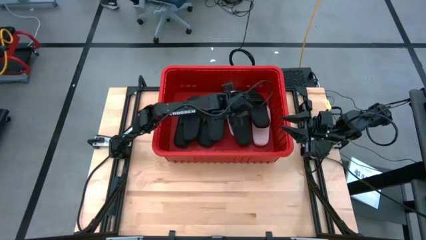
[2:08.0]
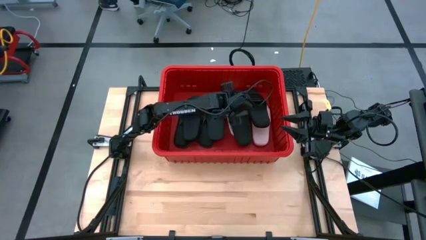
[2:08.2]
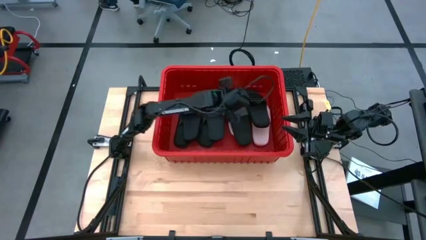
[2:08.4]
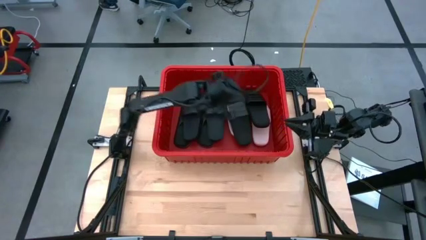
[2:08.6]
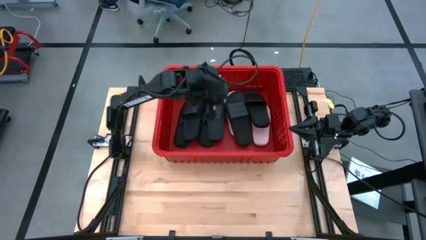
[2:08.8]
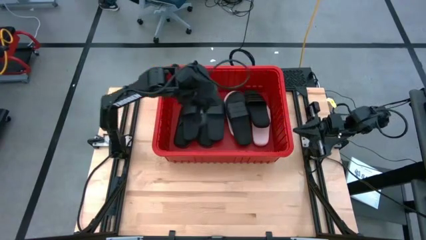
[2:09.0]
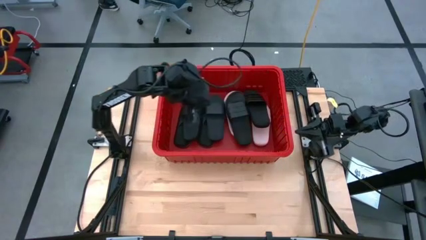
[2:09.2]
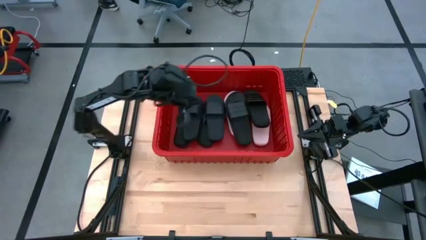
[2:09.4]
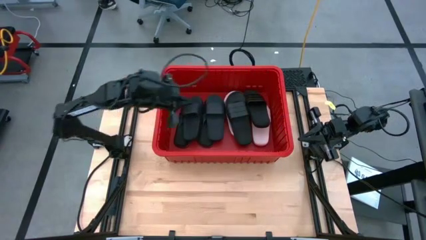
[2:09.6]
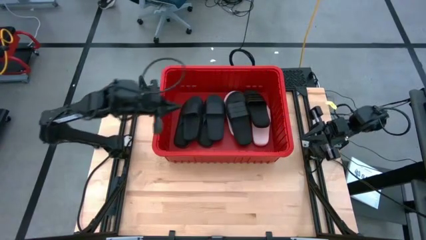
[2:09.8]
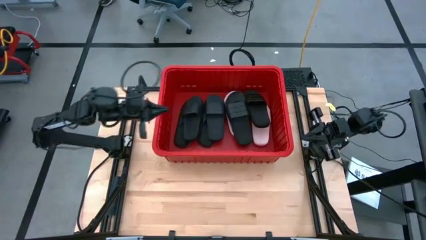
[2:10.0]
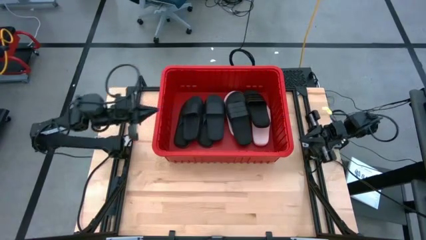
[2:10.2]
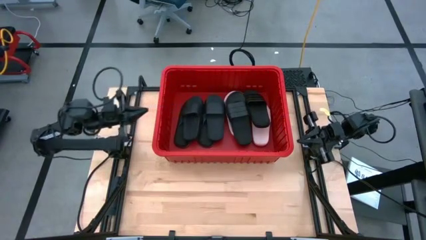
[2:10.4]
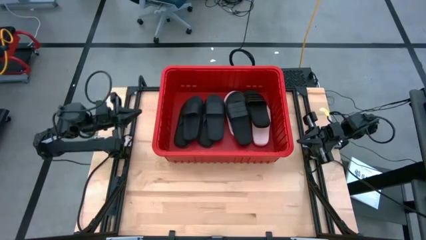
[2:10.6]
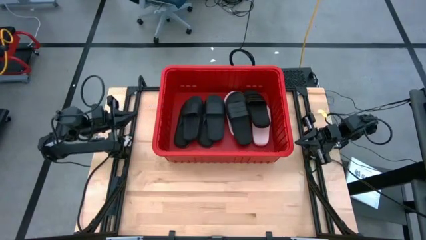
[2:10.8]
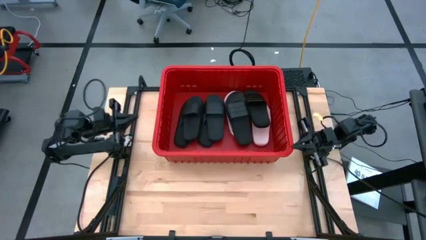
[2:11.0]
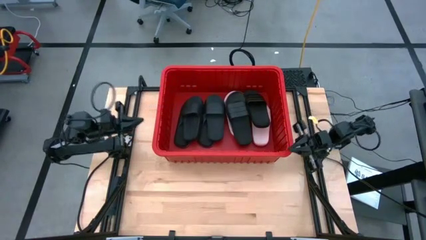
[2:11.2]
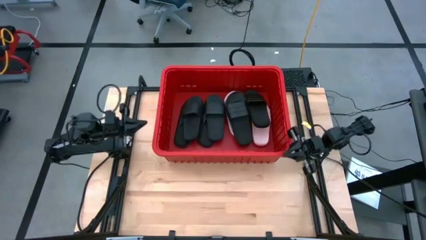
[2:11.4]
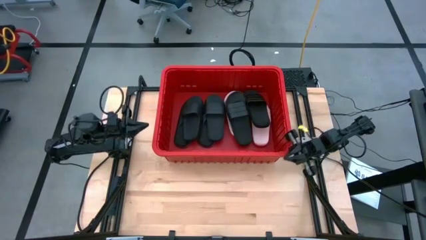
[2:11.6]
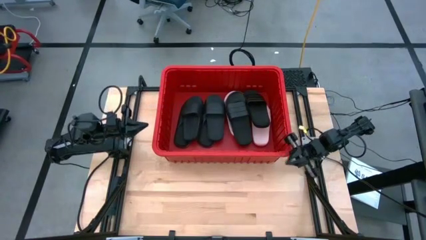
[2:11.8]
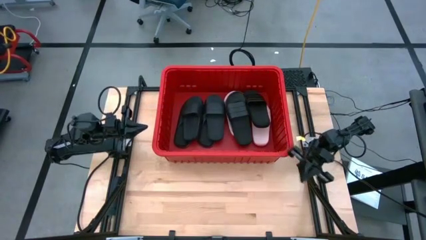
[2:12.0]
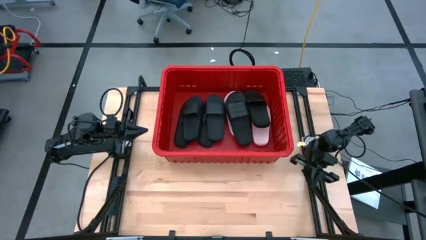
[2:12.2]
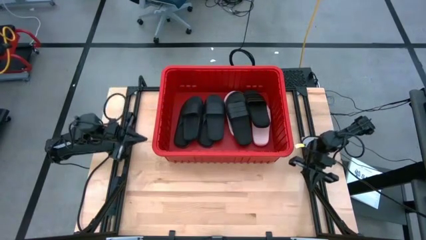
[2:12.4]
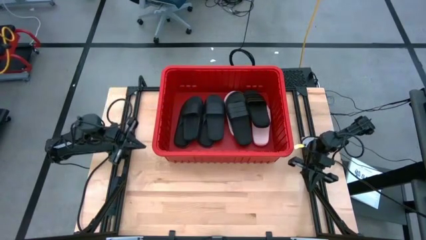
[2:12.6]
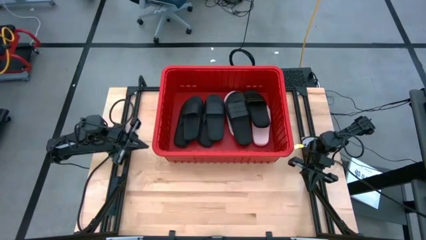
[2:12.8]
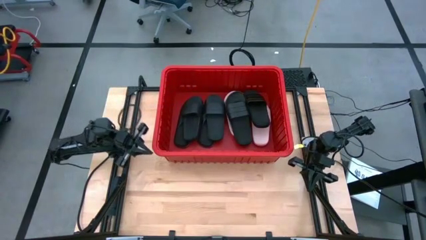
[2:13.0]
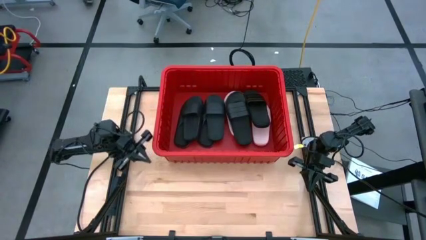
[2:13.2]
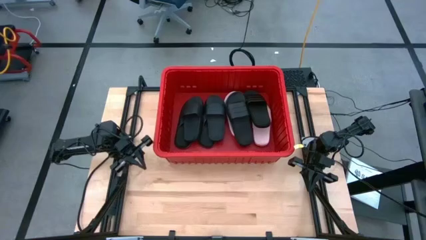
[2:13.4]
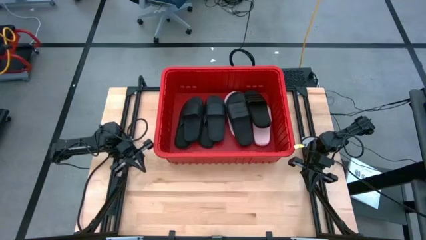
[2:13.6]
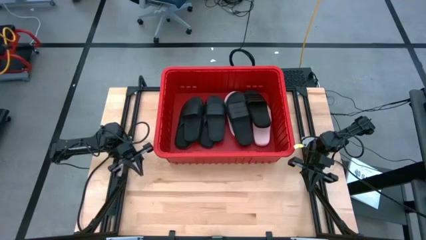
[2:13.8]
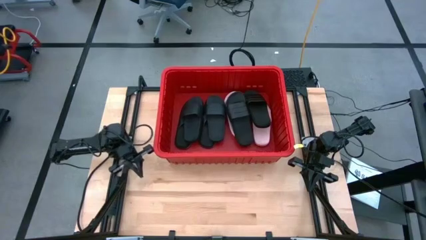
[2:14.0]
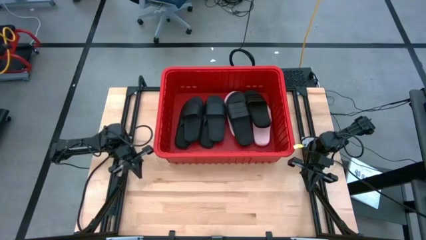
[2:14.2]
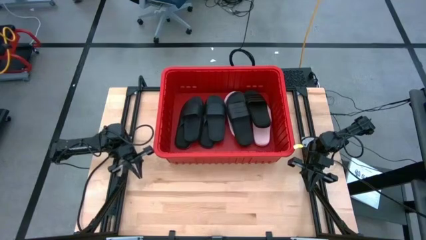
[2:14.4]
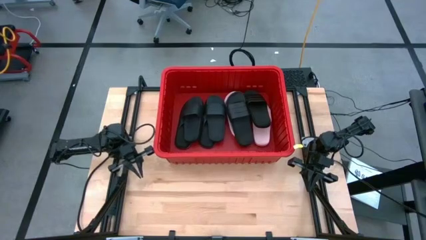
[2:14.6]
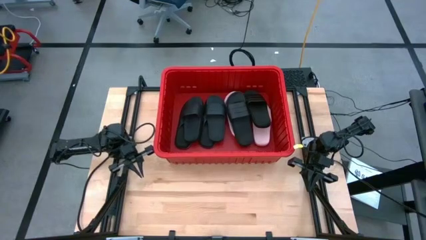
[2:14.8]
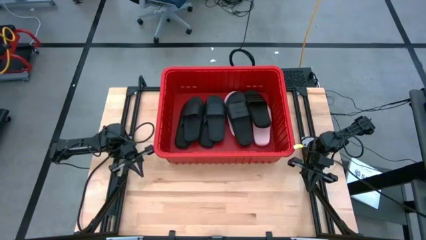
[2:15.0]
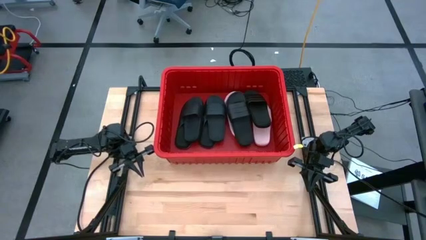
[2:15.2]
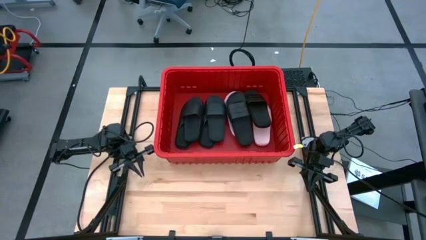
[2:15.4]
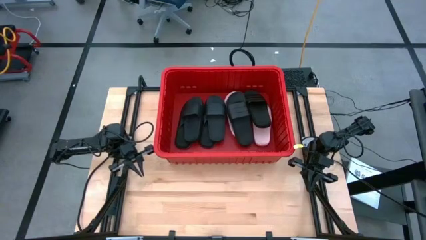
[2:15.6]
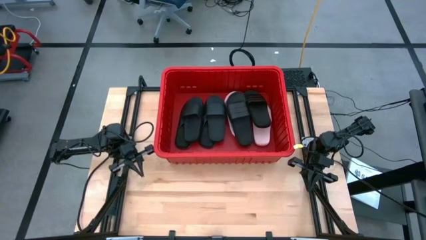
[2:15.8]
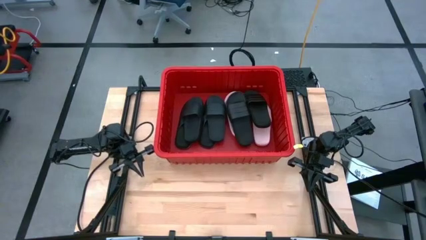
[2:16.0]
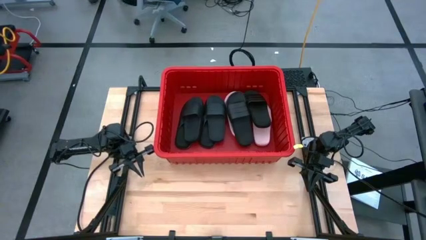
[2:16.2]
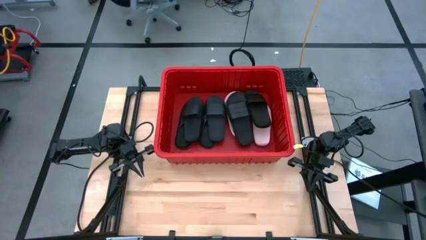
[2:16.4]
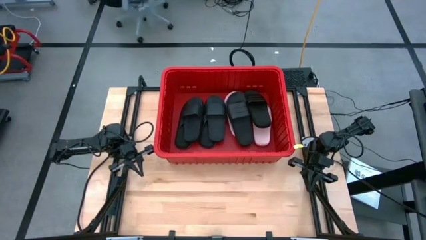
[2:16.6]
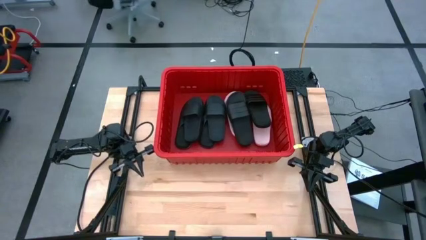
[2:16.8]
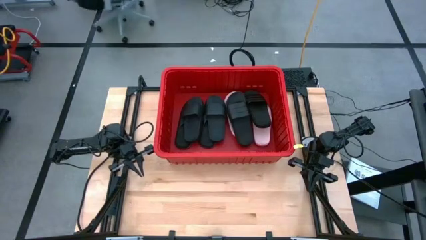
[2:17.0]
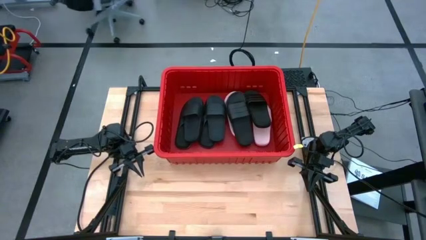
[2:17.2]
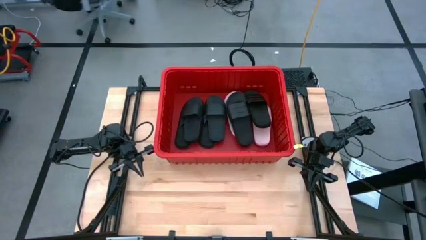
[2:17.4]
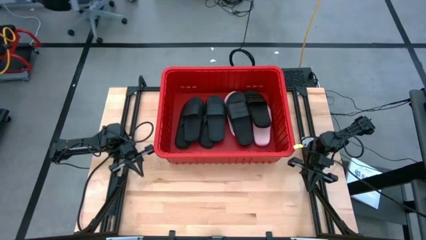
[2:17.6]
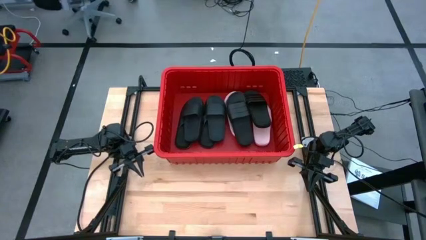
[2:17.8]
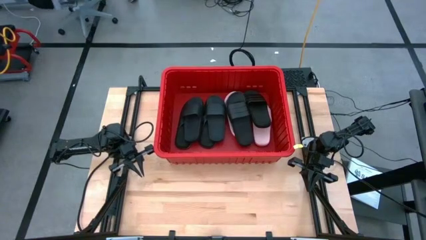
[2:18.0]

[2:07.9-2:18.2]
Task: Pick and place slides into bin
Return to Home Position
